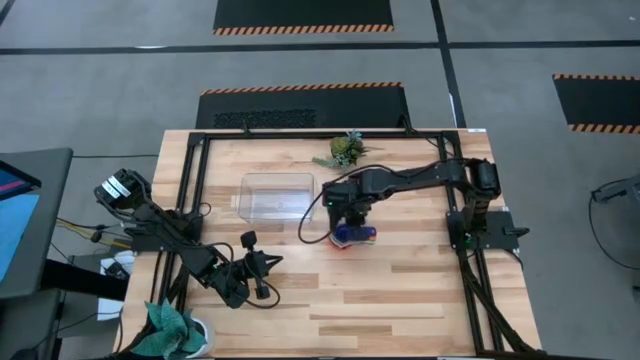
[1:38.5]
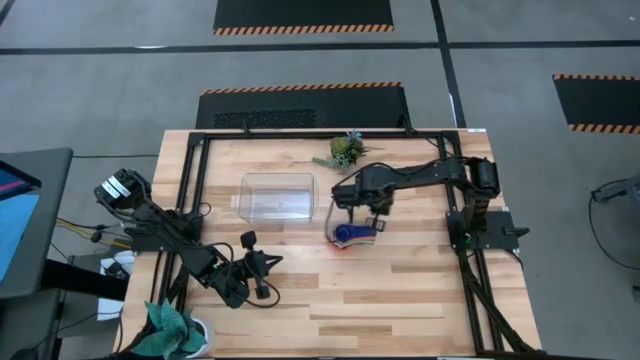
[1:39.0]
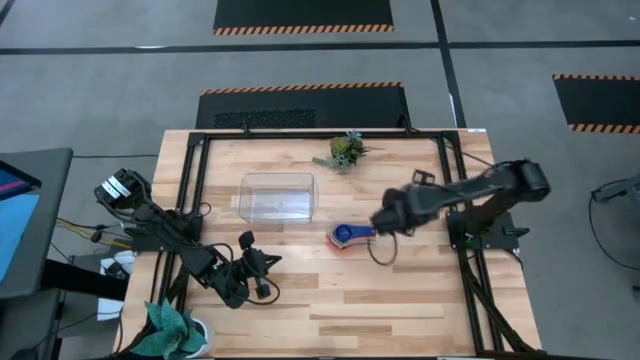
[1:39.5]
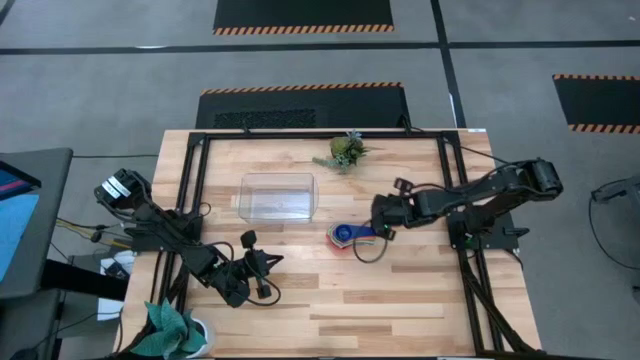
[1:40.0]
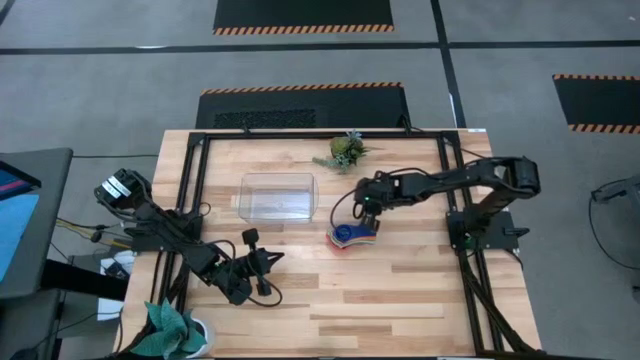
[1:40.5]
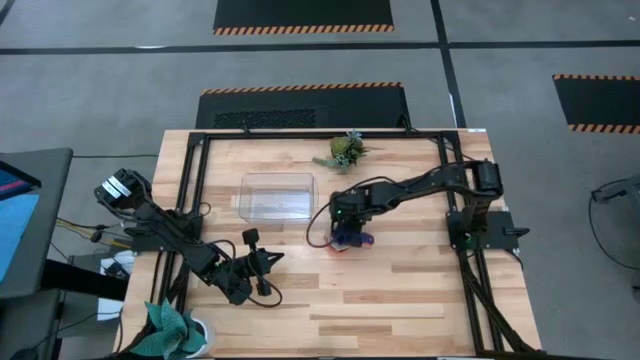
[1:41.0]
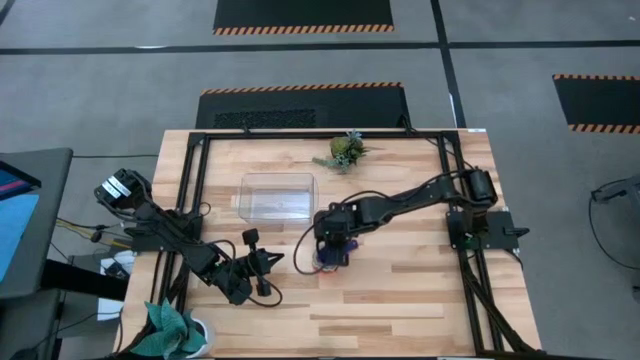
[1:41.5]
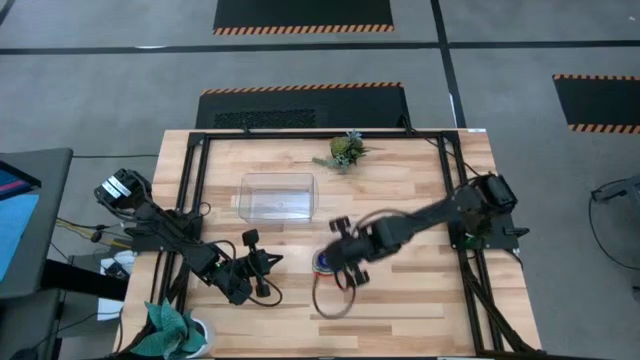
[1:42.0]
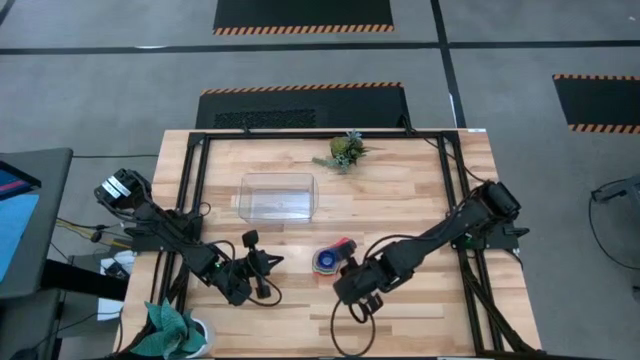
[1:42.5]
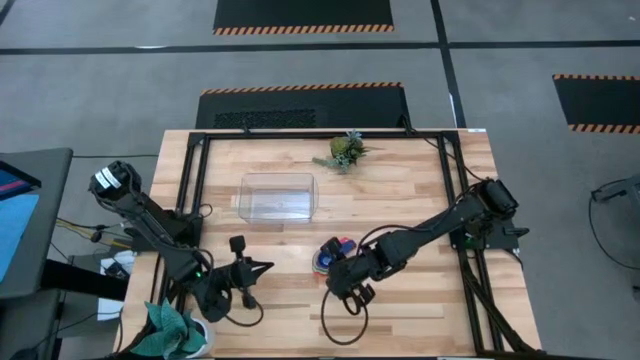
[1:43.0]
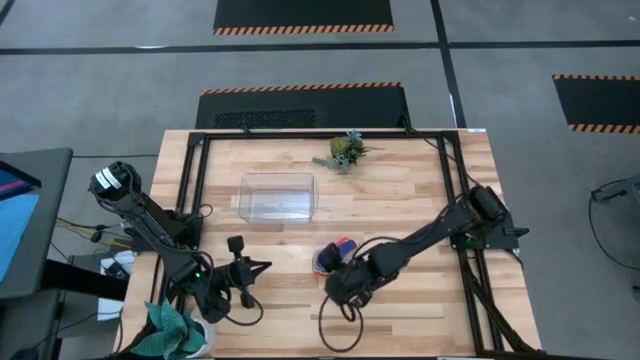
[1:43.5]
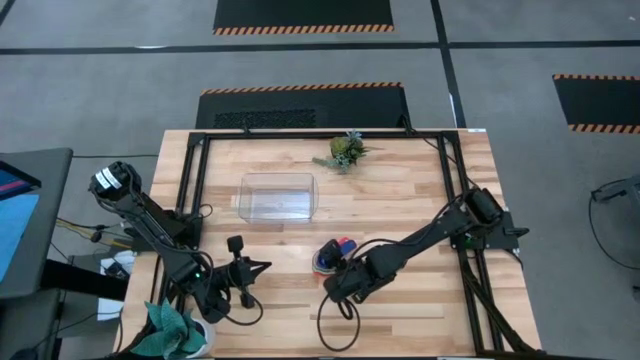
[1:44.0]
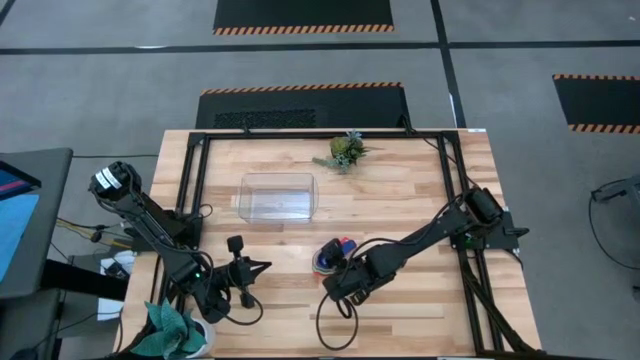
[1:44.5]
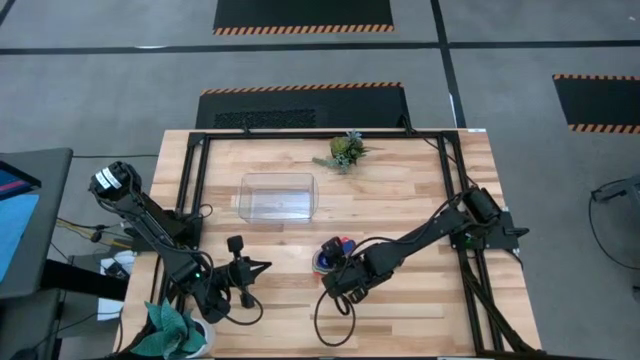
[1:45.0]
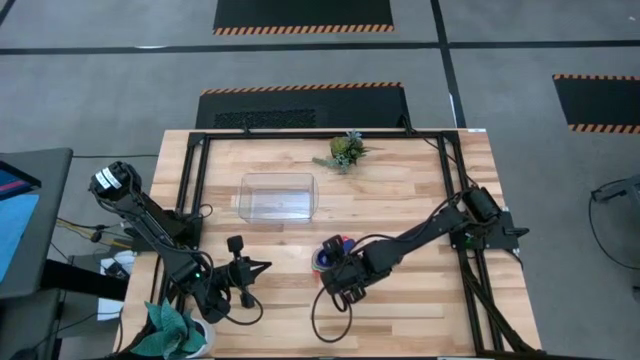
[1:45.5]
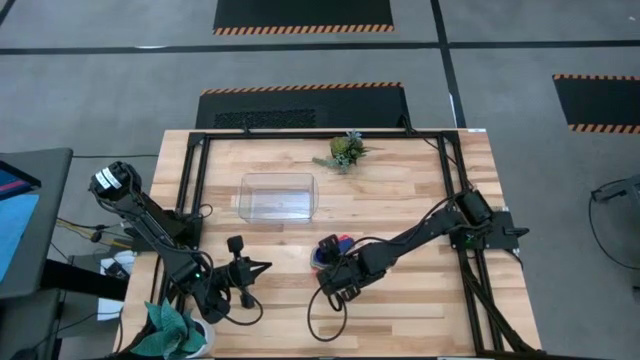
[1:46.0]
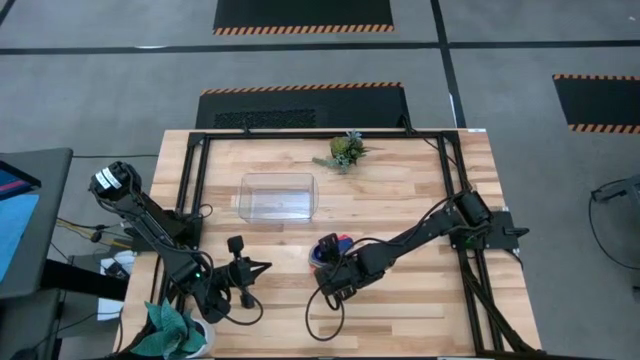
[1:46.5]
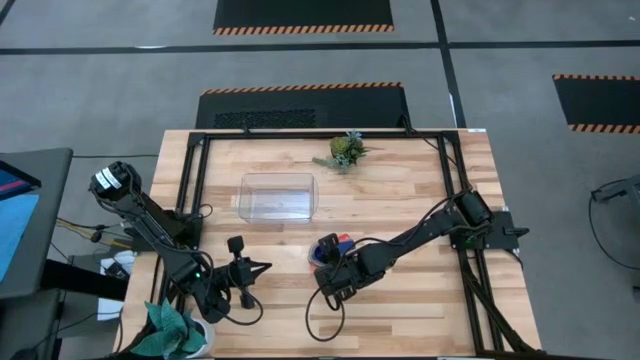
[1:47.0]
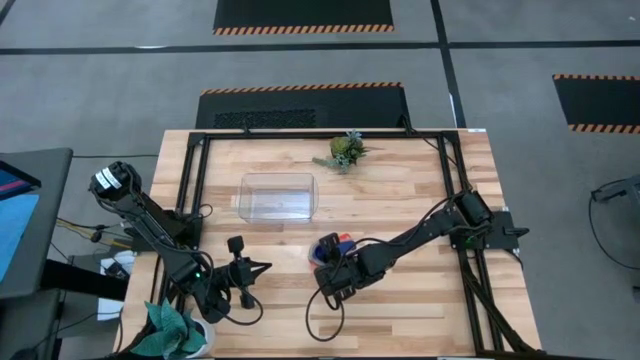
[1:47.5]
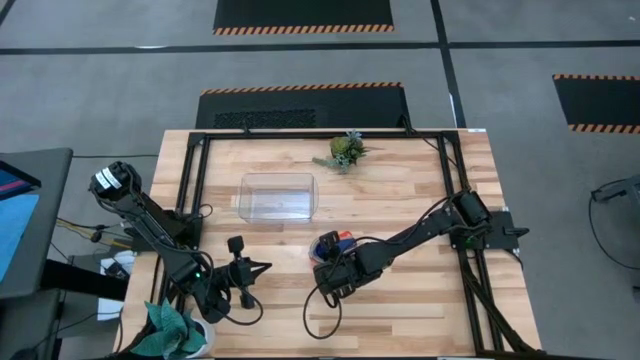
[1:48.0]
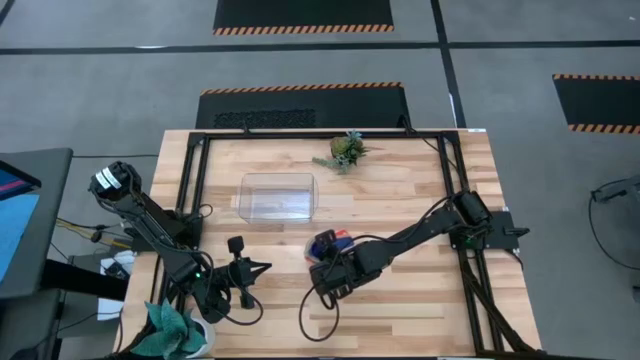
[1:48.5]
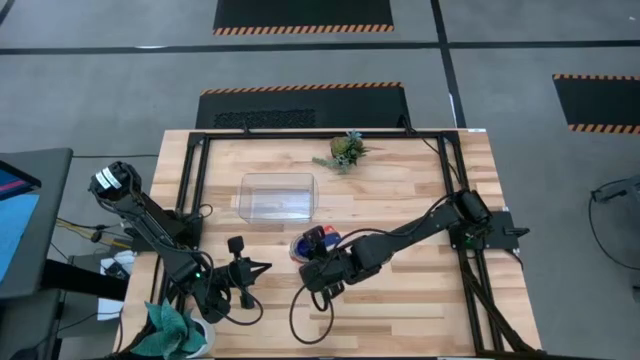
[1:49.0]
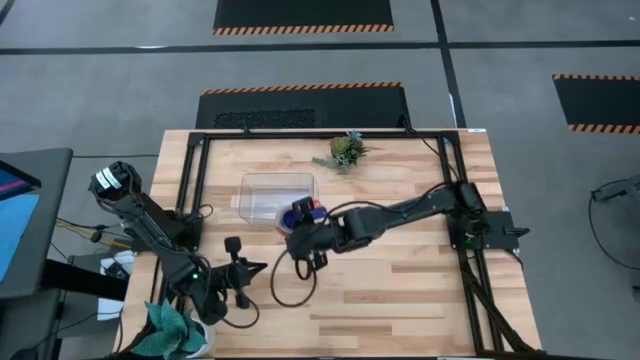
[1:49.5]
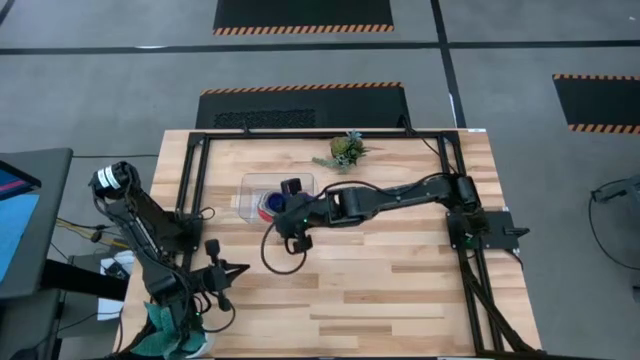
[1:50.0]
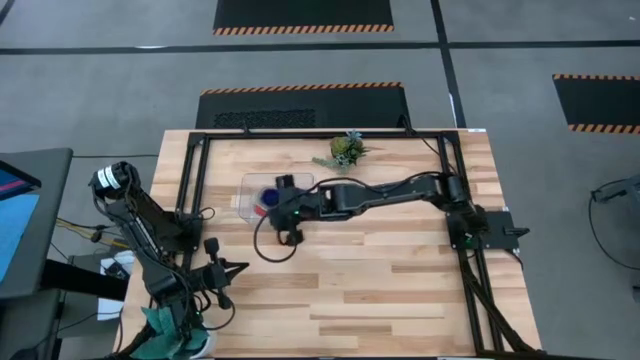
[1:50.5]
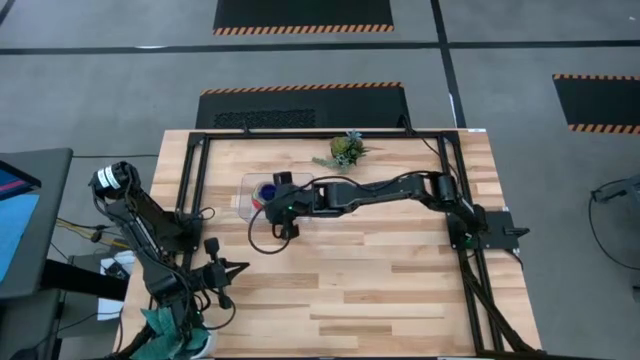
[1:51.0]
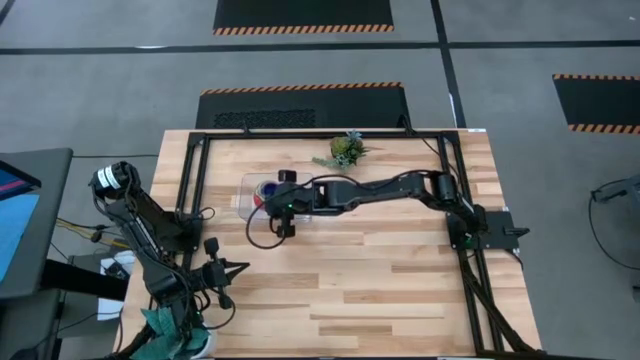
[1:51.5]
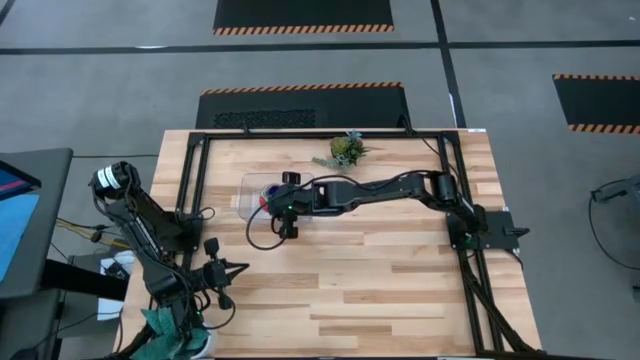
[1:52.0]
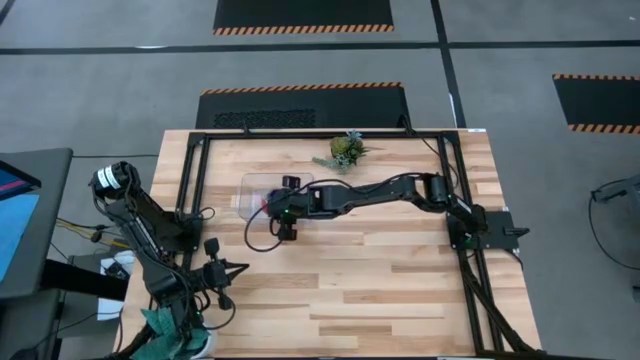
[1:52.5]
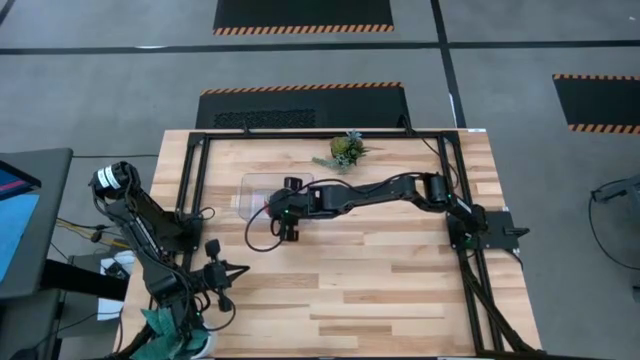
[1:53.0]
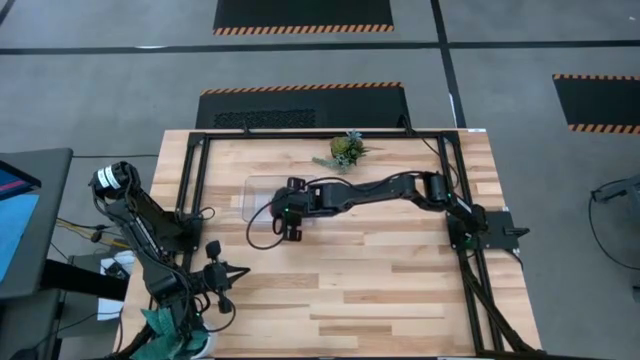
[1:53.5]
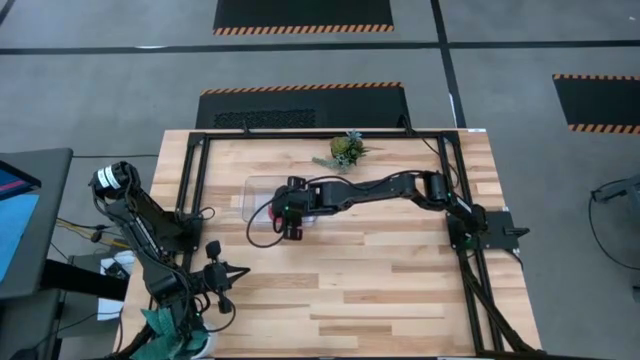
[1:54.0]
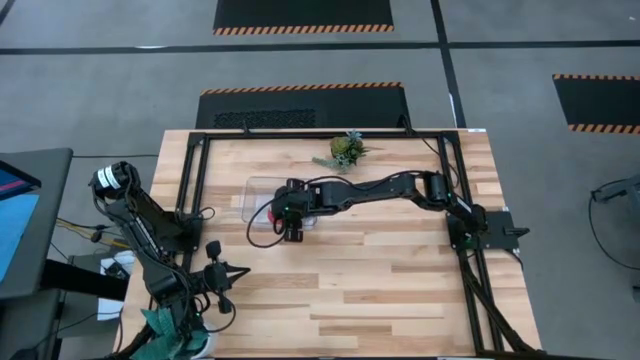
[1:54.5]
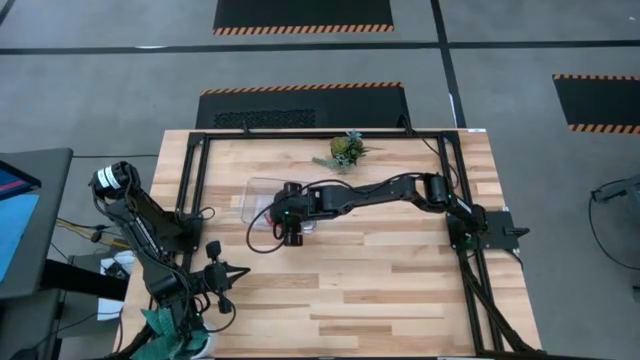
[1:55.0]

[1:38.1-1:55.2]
Task: Nest measuring cups in basket
Put the stacked measuring cups into the transparent bin

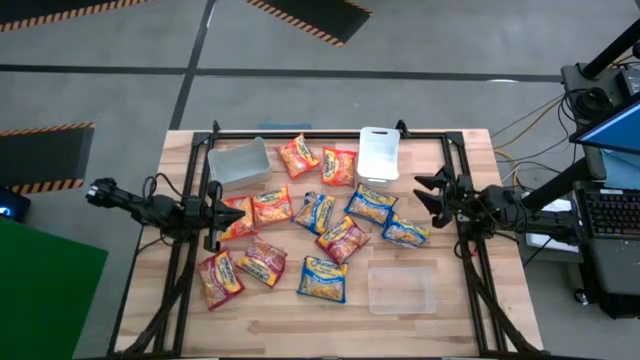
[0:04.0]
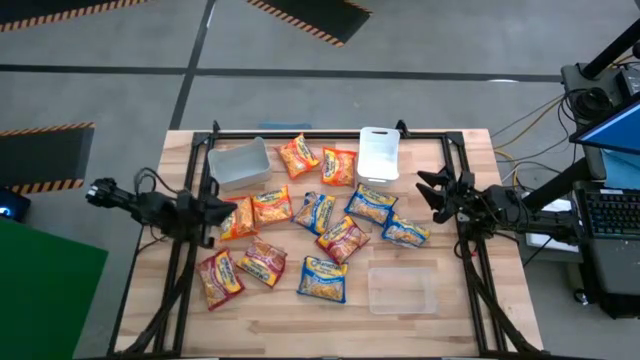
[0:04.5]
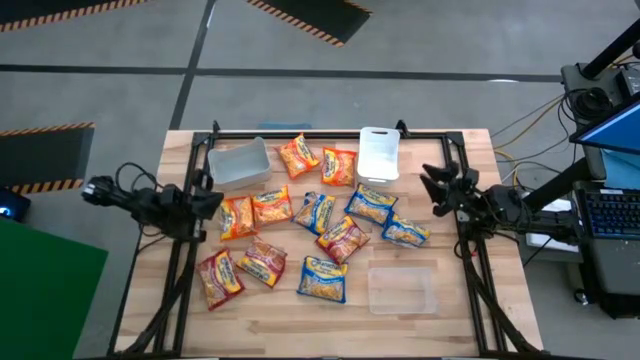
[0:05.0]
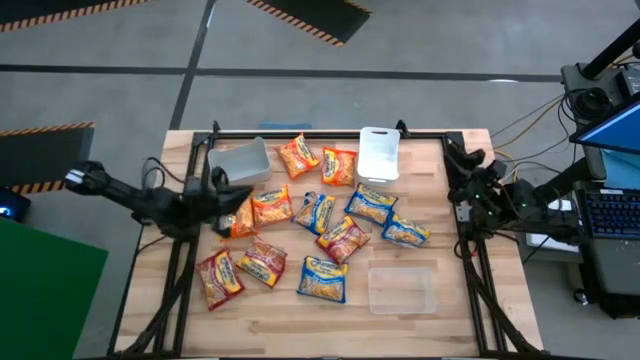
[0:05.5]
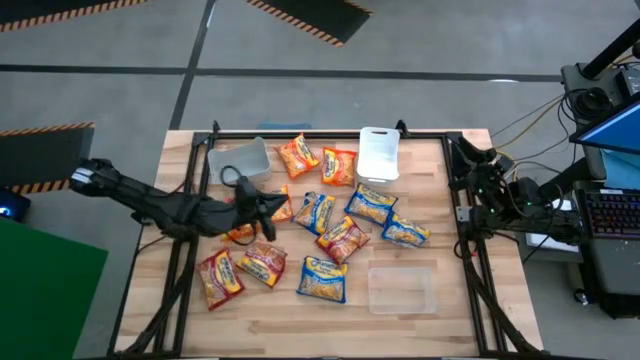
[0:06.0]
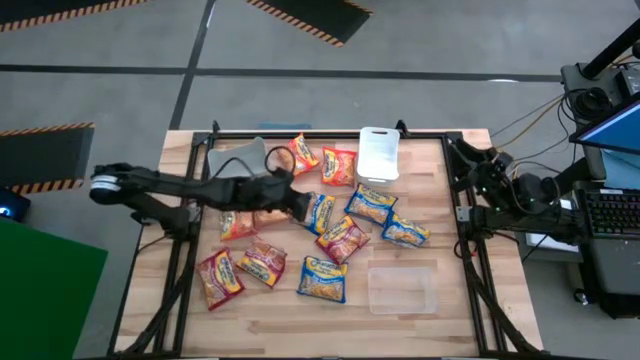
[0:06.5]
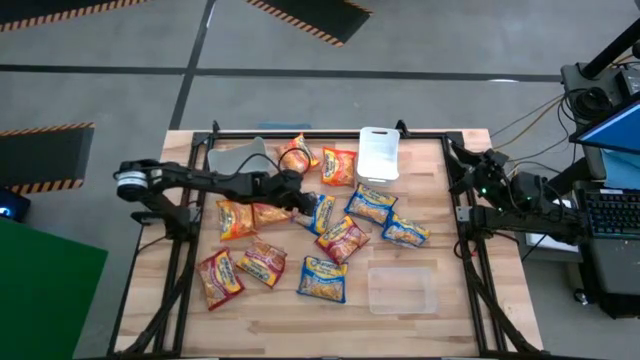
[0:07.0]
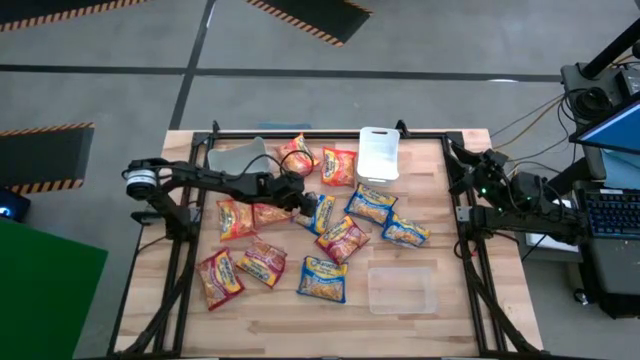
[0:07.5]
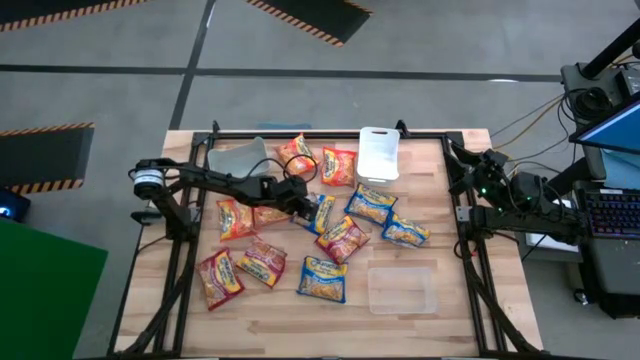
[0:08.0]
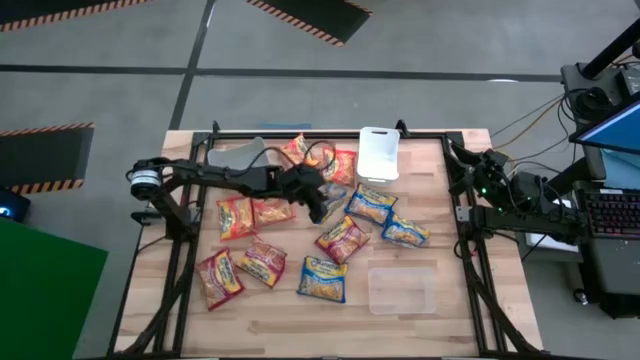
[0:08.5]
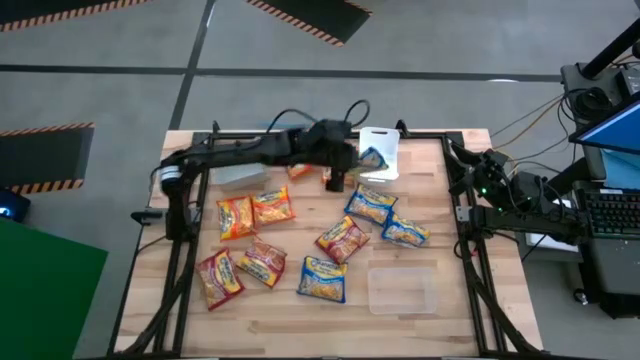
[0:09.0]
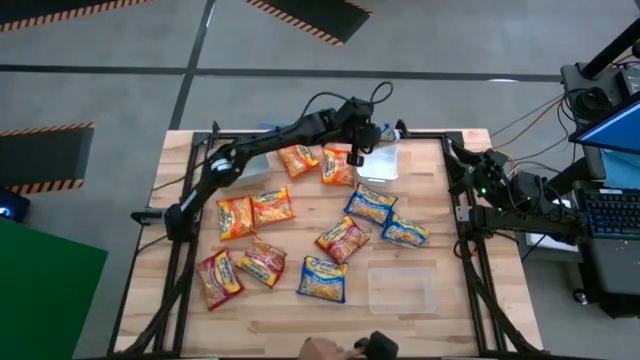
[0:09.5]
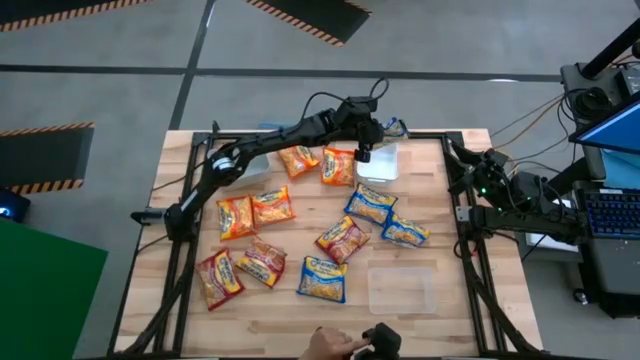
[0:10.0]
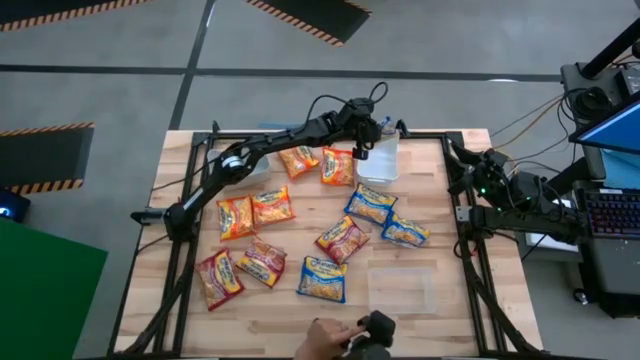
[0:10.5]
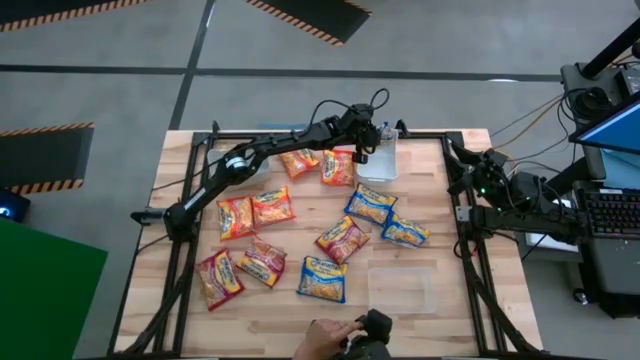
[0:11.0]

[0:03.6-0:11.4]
Task: Sort Maruchan noodles
Put the blue noodle pack into the white bin
